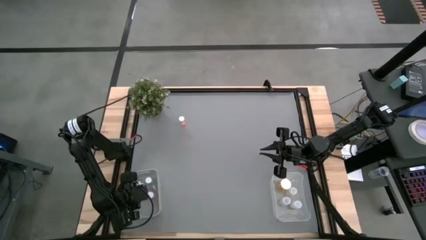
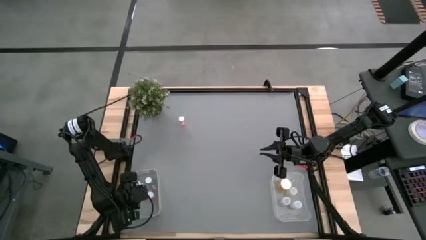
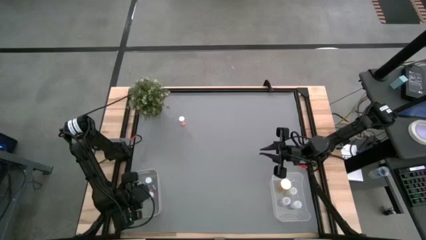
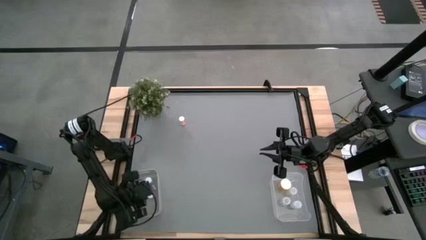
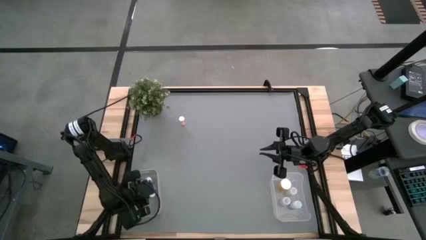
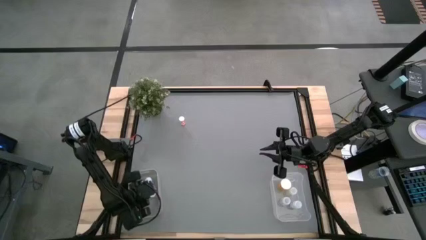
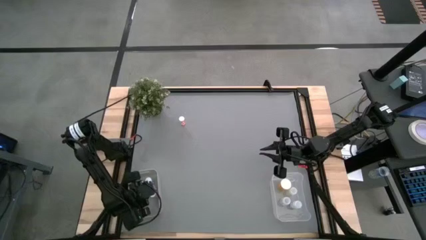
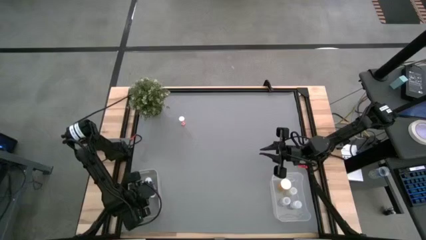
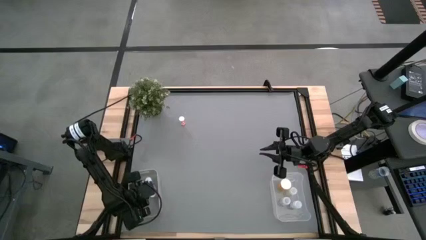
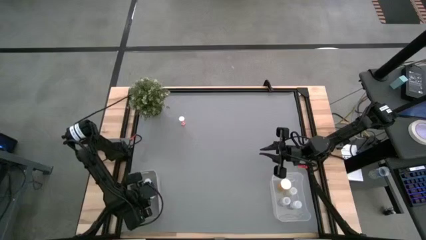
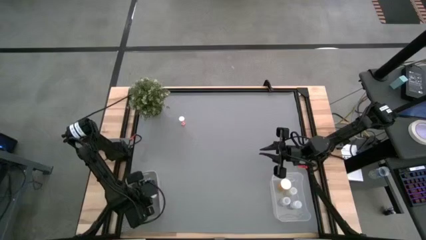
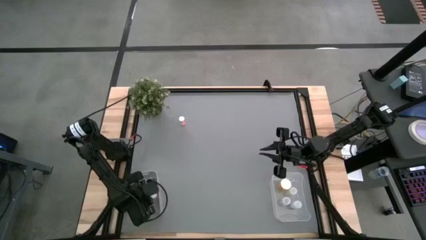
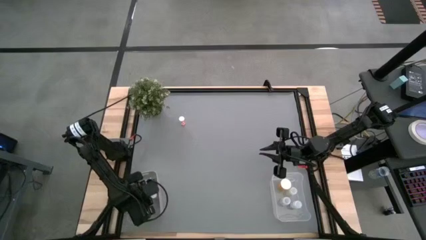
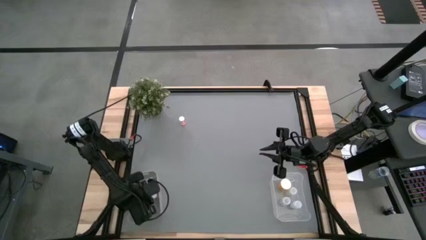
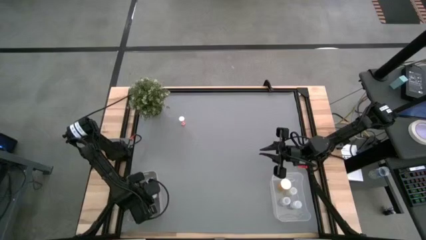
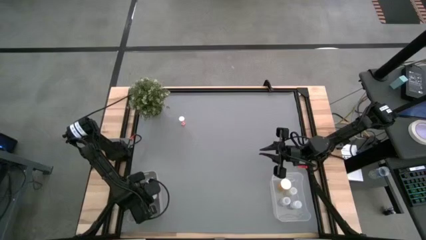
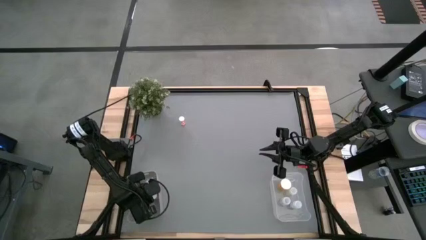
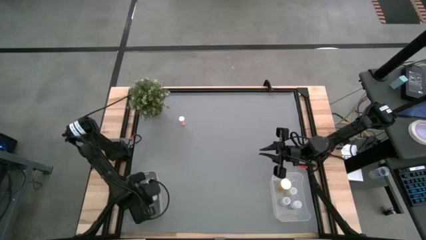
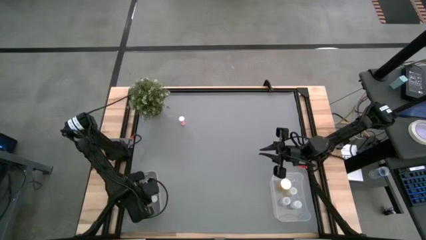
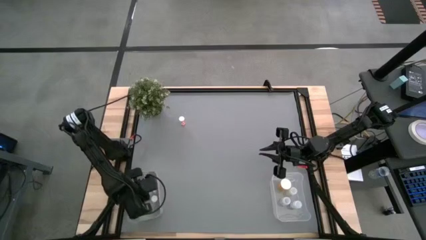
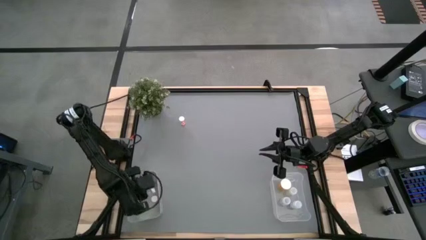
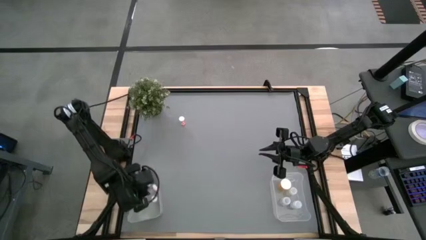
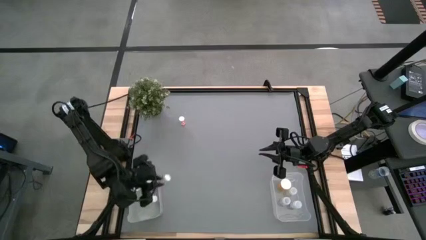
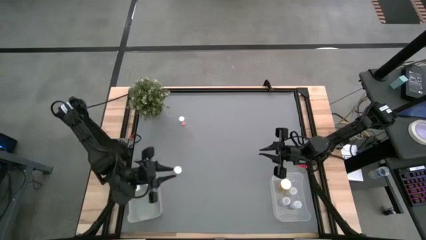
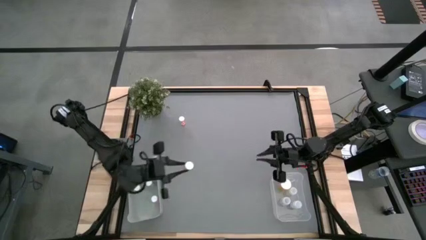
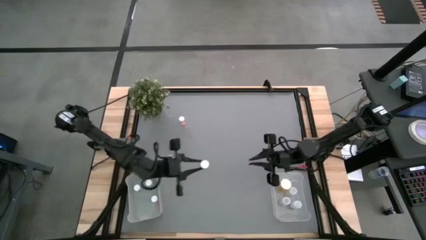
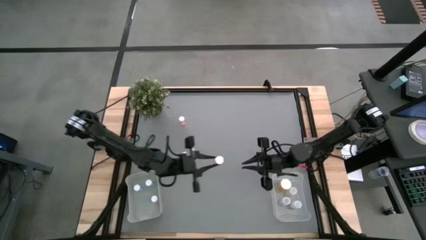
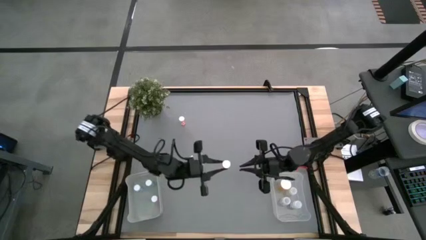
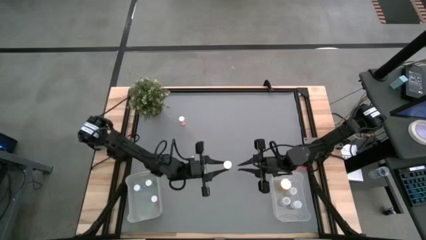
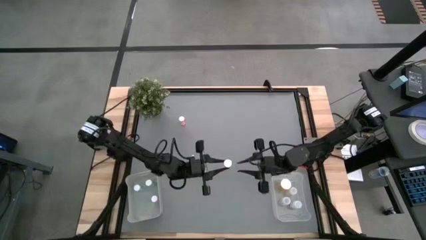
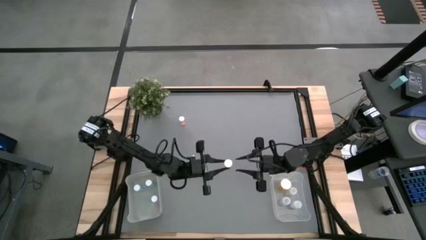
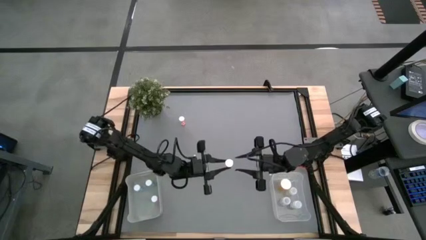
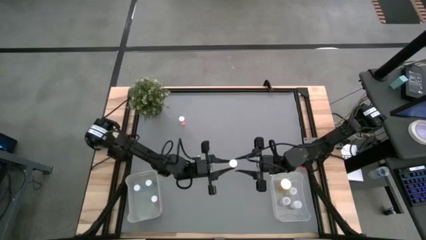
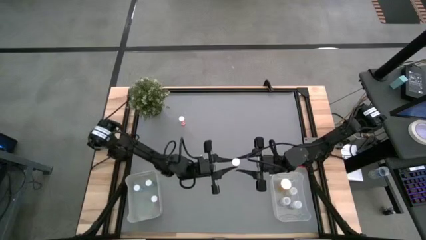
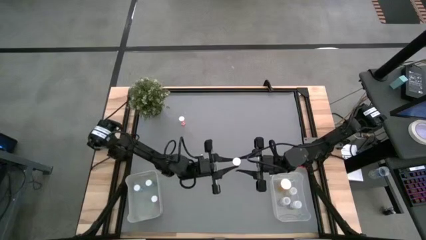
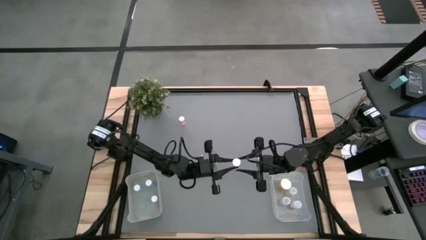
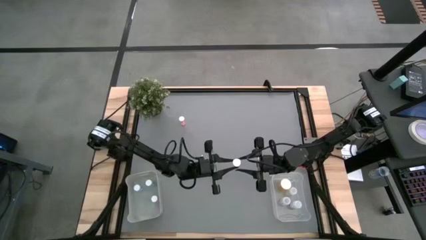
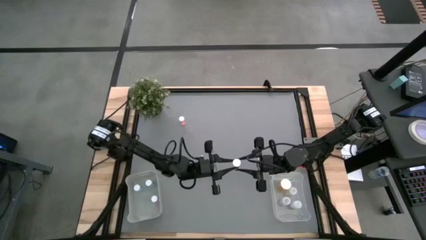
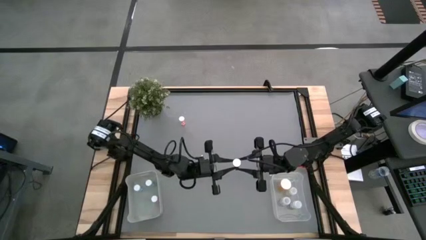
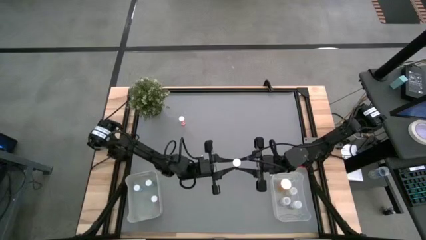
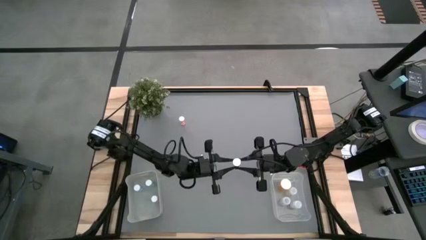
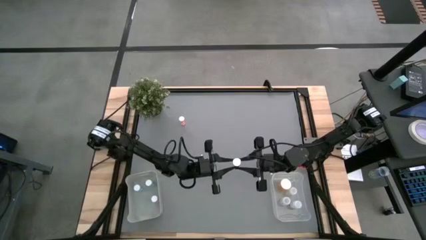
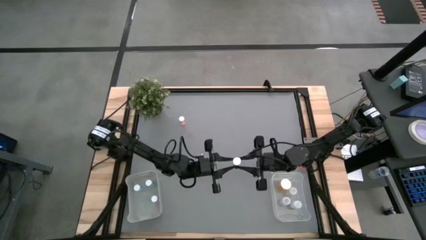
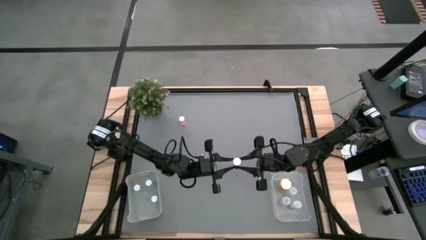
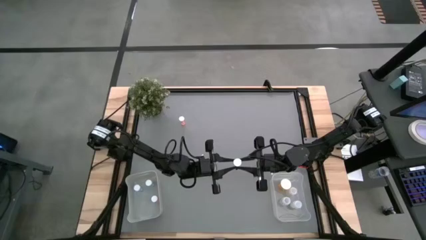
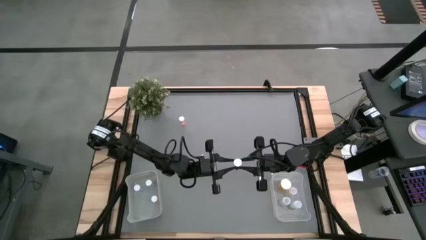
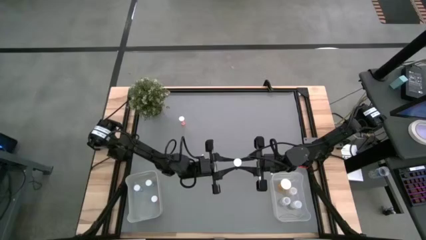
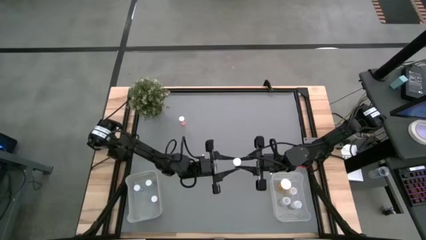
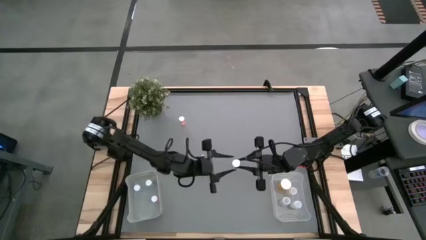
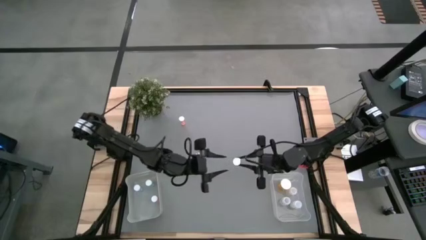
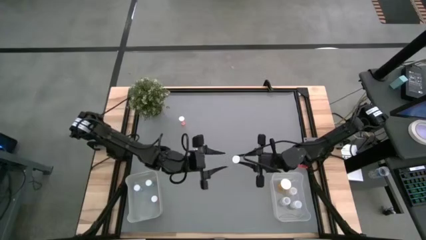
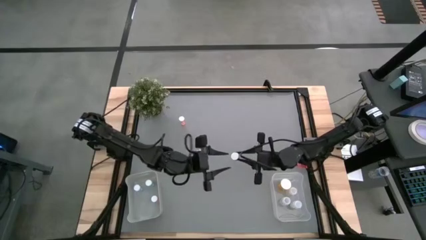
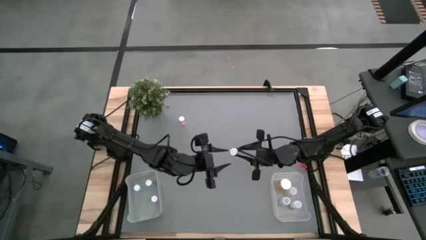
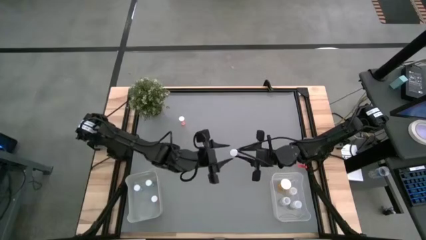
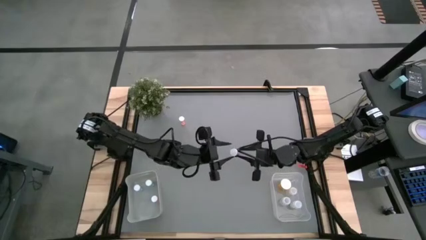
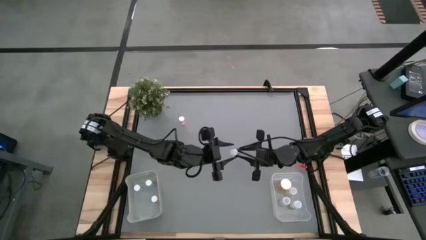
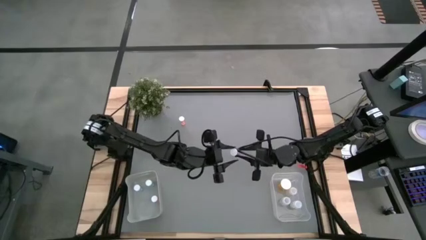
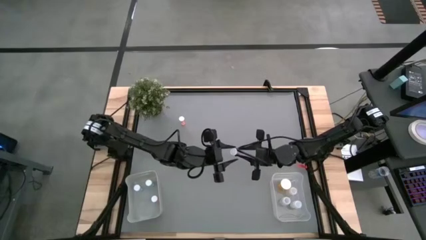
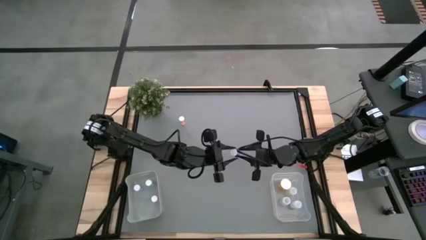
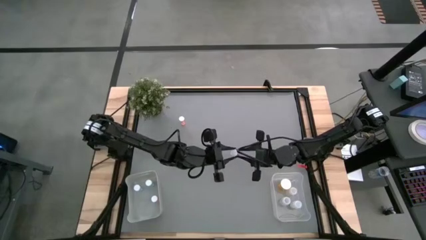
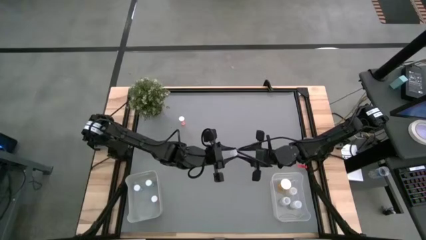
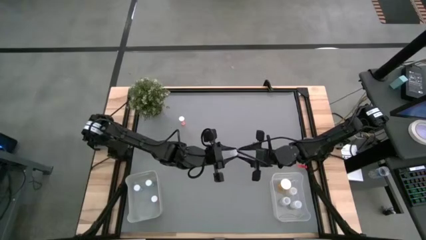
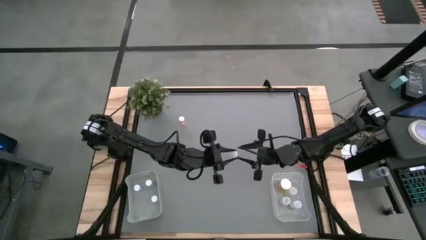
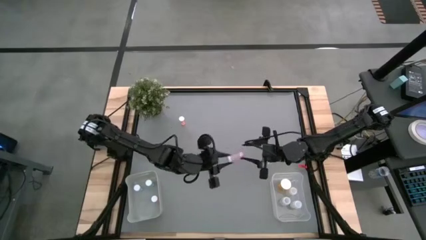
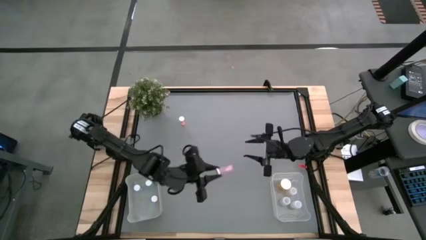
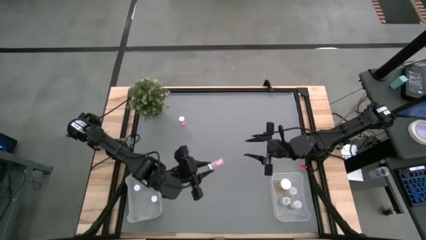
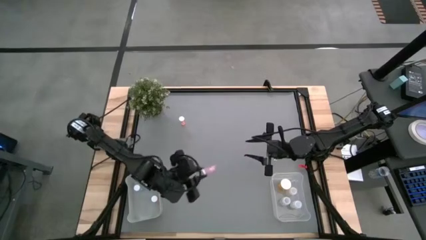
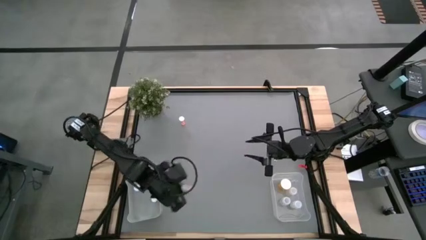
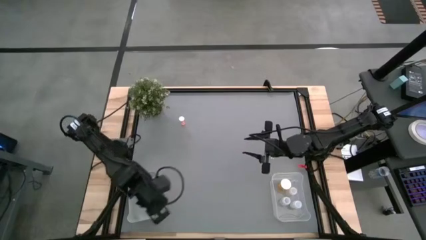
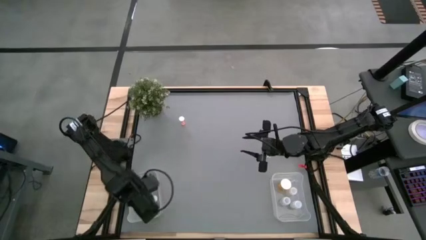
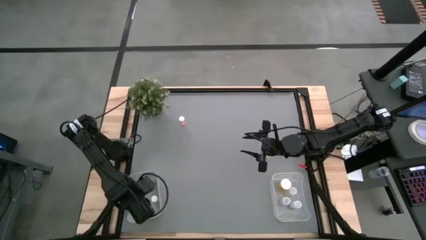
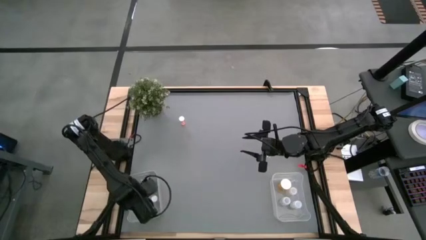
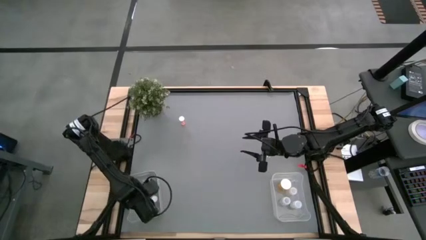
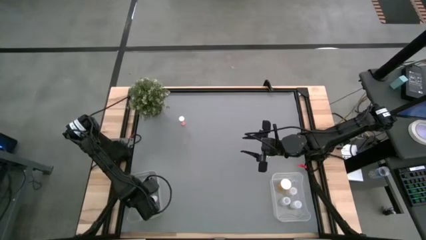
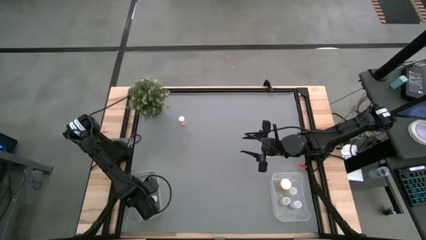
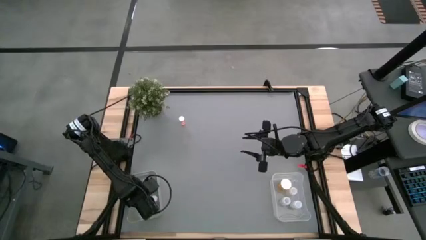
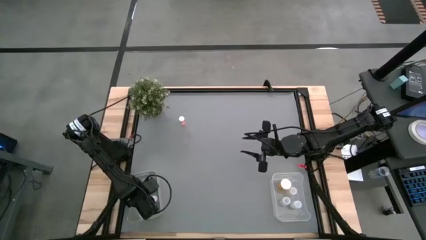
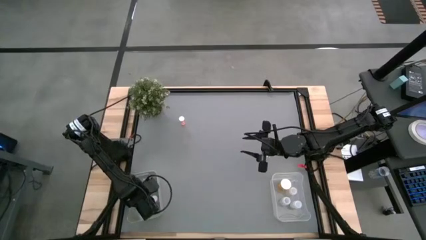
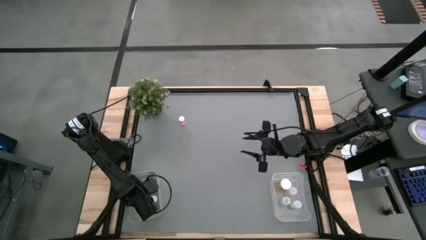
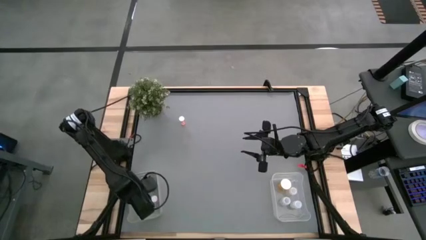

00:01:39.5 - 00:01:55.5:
Task: Pick and place medicine bottles into bin by pill shape (circle, oval)
Put the pink tablet bottle into the gray bin

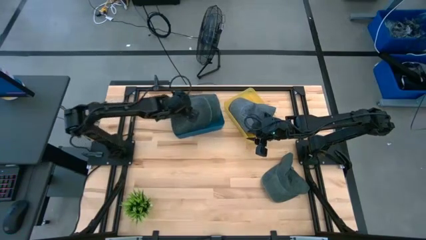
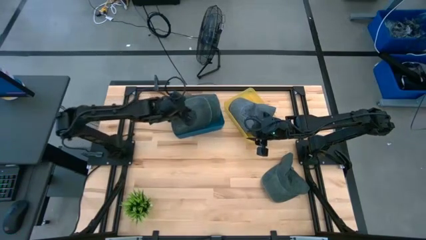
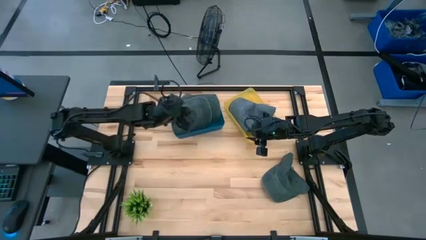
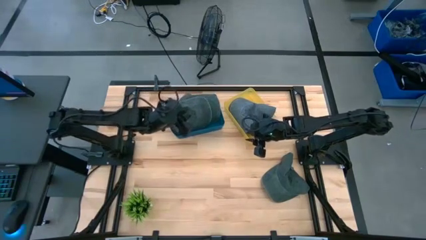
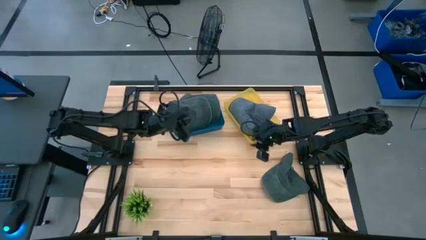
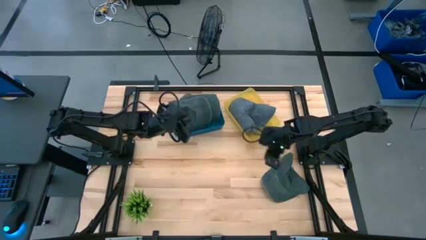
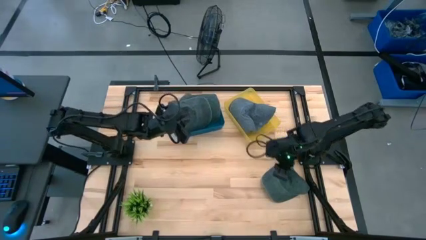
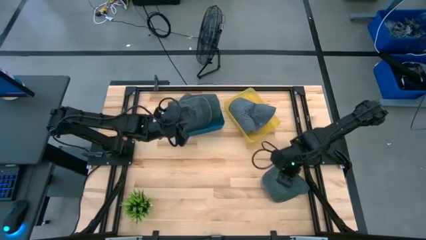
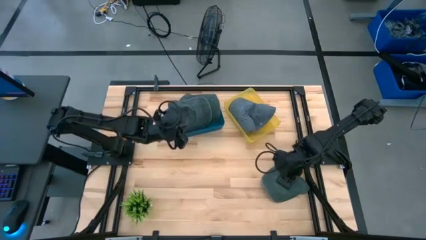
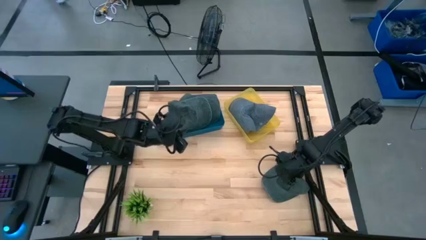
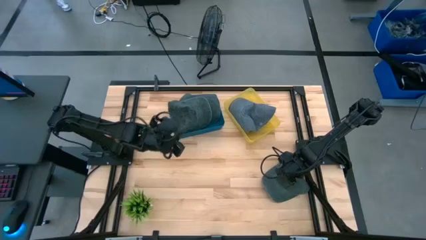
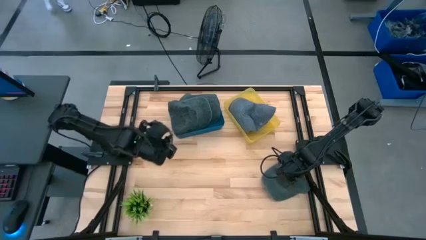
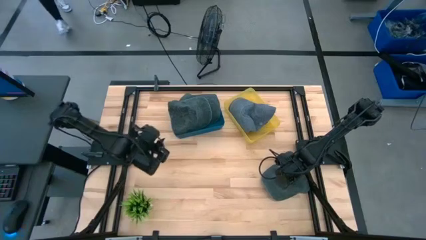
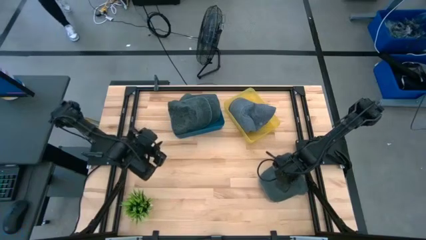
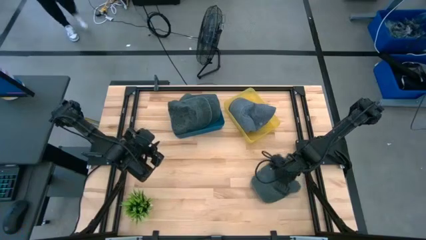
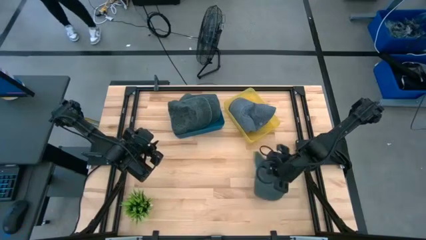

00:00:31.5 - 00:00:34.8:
Task: Pick & Place hat
Put the green cap into the blue bin
